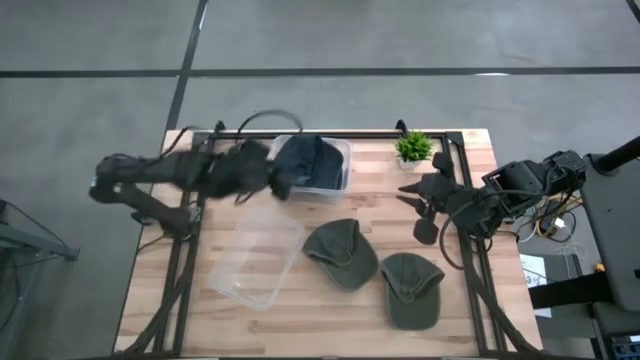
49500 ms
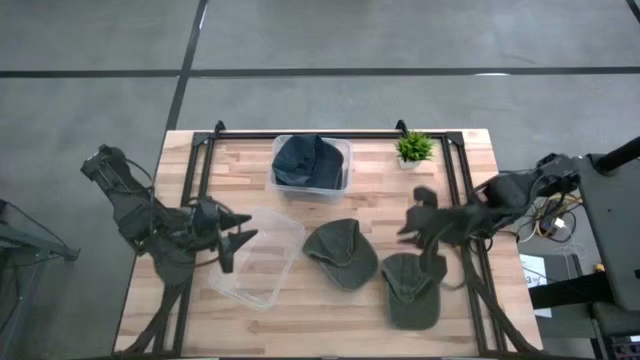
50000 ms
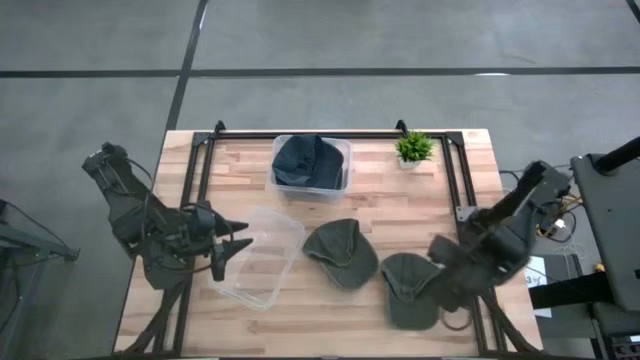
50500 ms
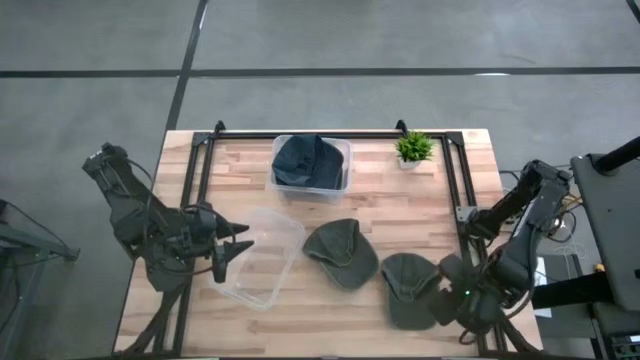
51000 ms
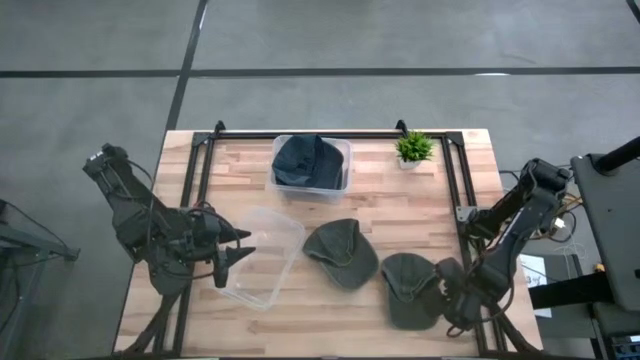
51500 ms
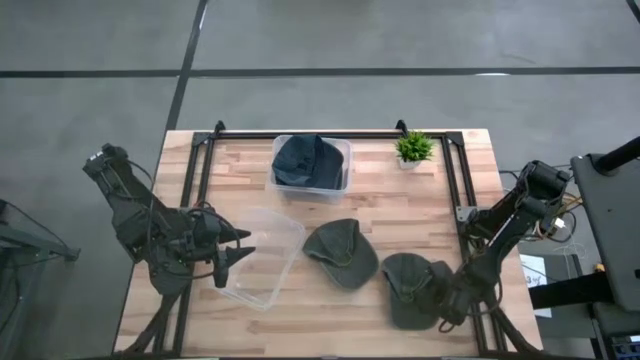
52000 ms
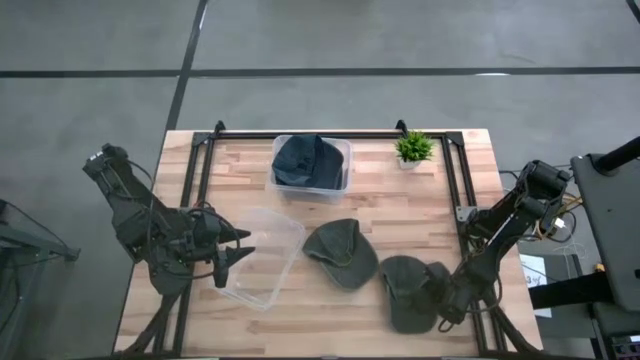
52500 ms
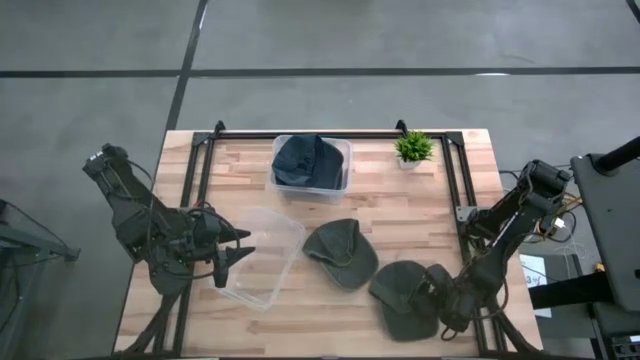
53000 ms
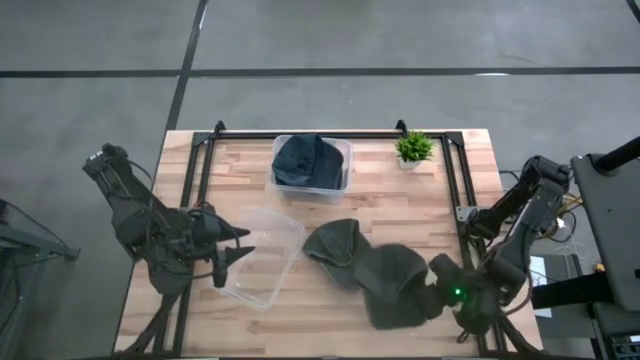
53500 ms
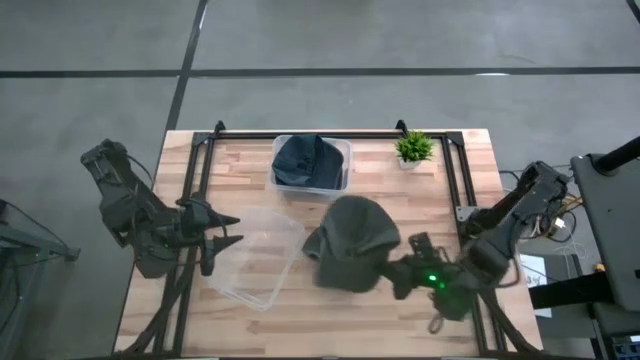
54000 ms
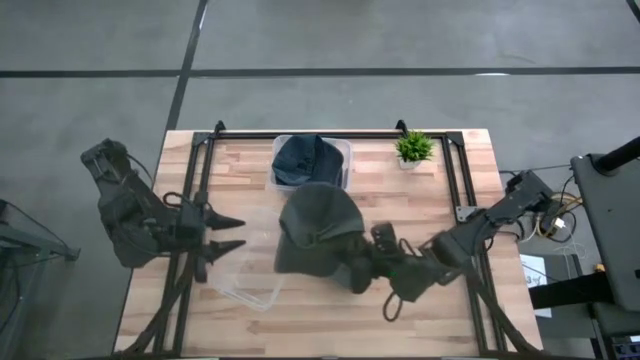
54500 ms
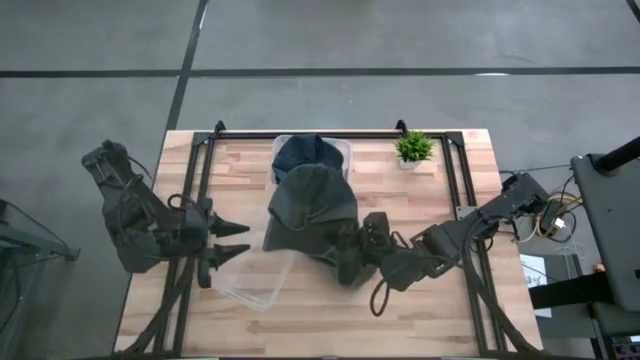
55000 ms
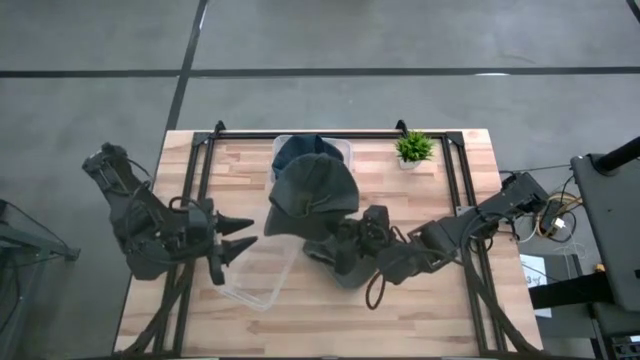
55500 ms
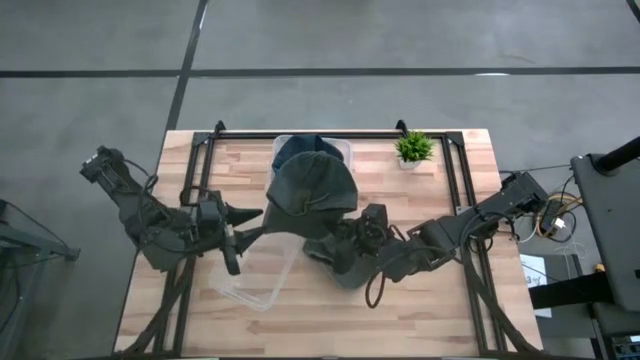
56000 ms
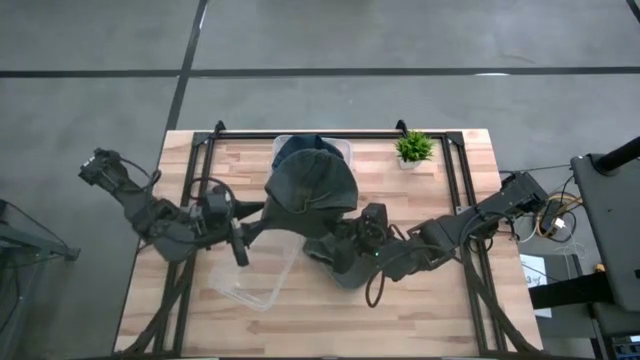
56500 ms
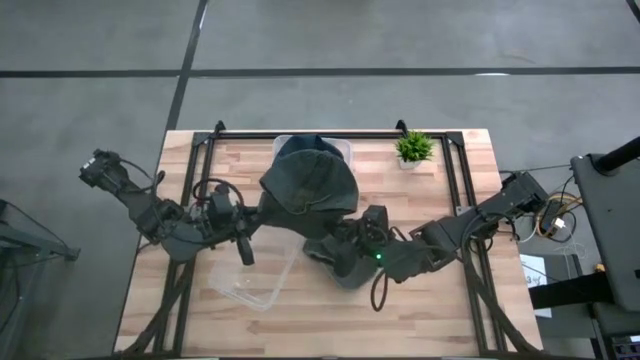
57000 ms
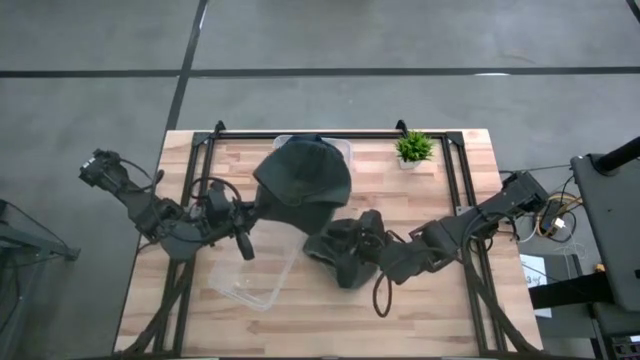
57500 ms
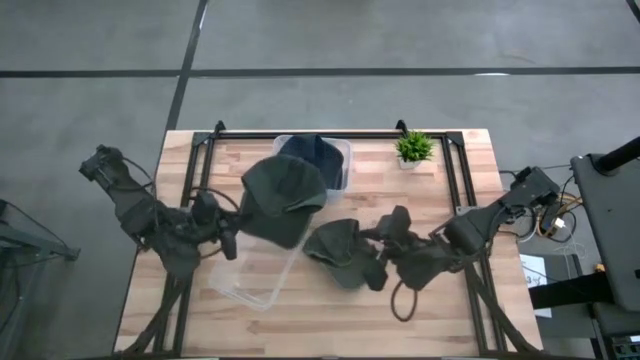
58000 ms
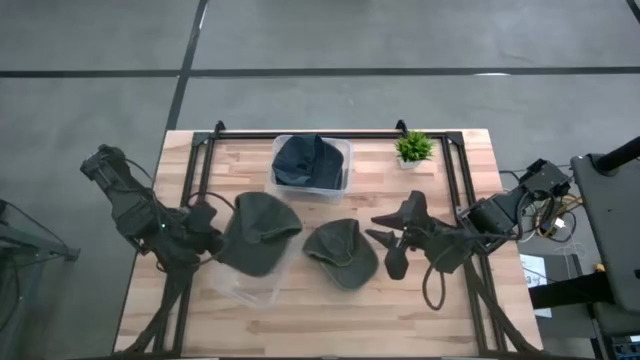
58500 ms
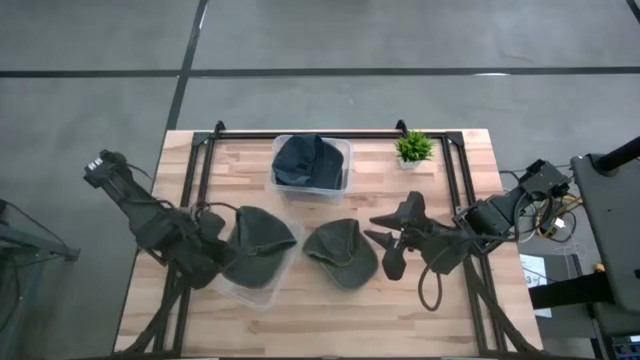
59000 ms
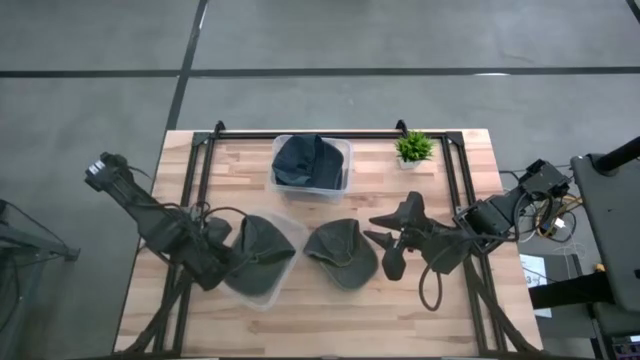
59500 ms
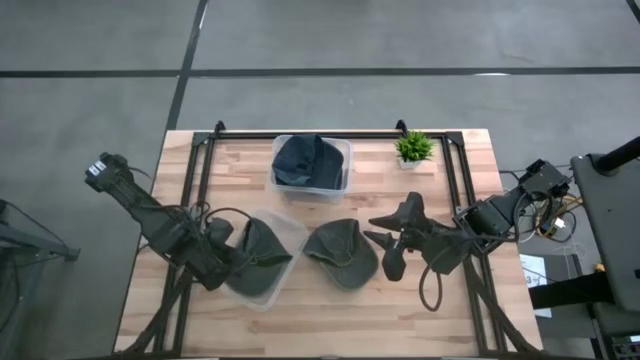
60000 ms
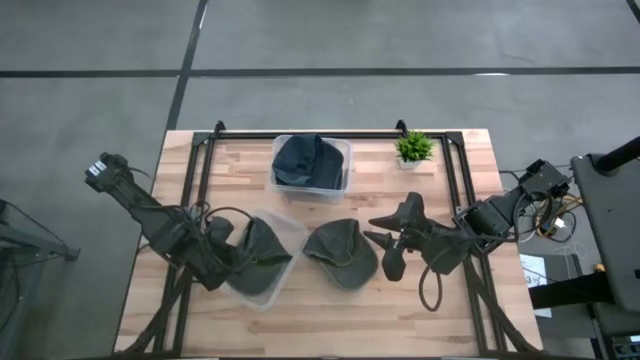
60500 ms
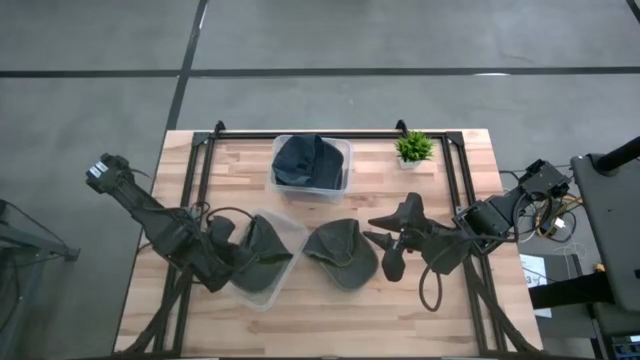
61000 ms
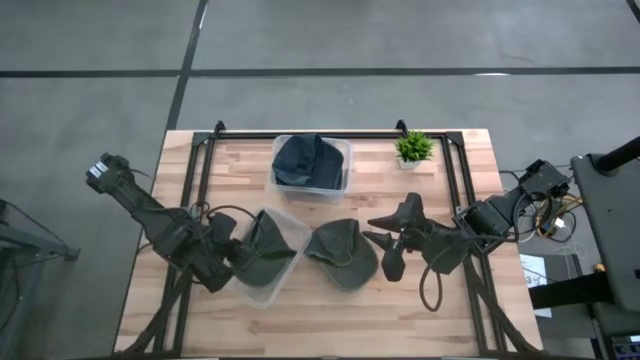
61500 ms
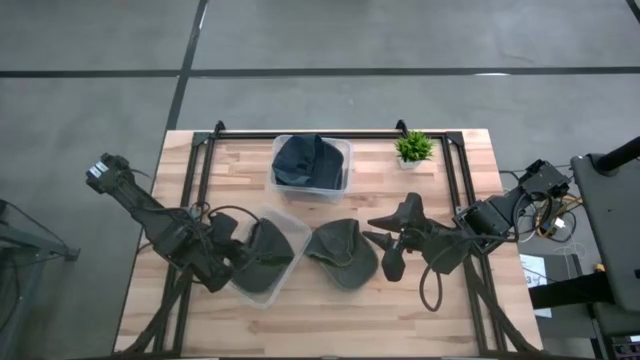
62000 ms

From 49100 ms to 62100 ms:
Task: Pick & Place hat
Put the right black cap into the bottom transparent bin

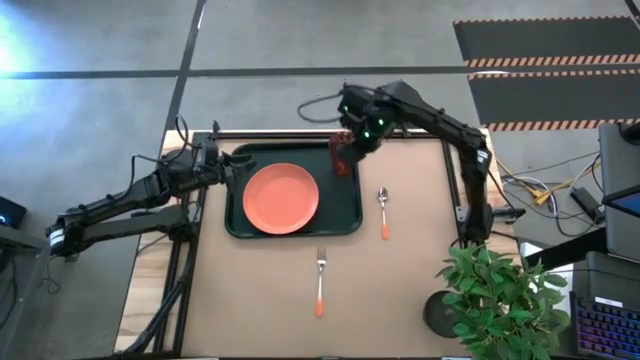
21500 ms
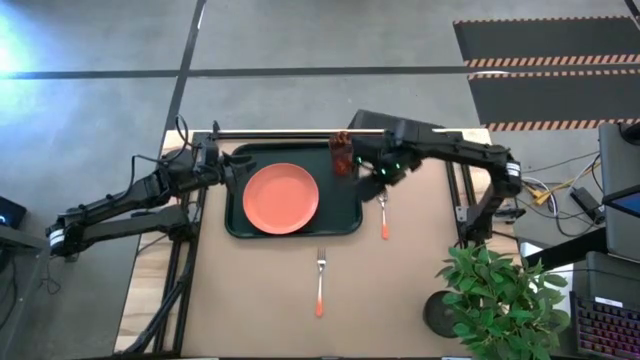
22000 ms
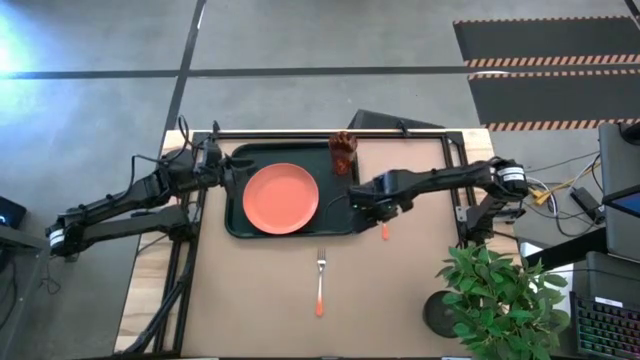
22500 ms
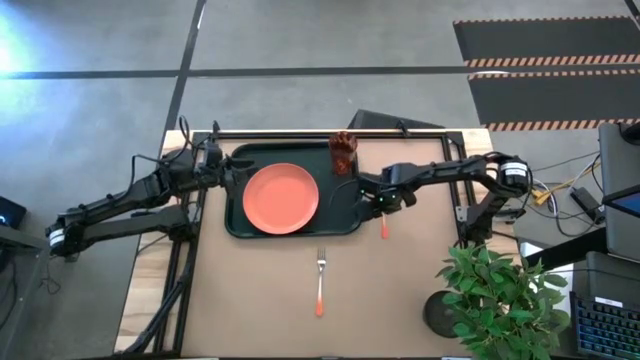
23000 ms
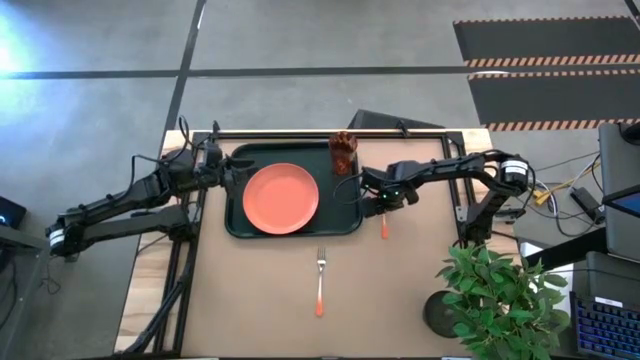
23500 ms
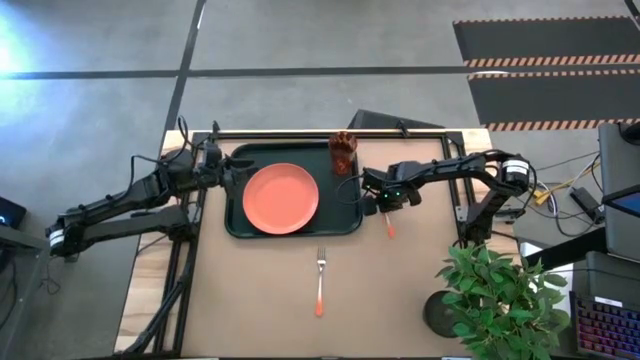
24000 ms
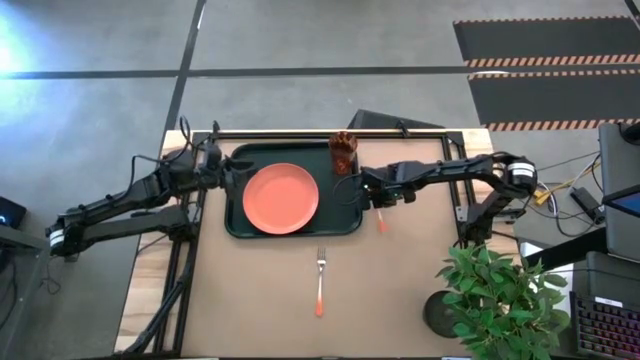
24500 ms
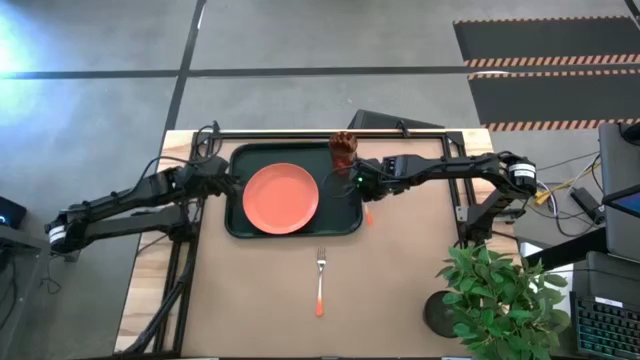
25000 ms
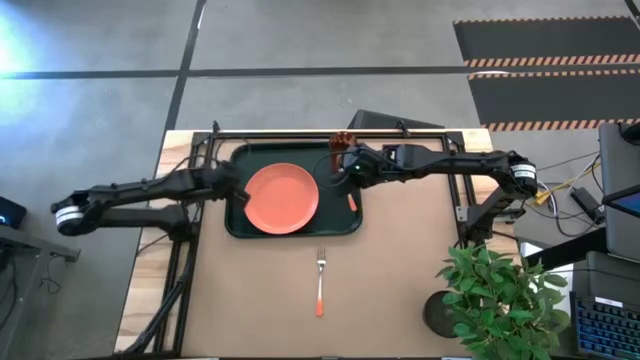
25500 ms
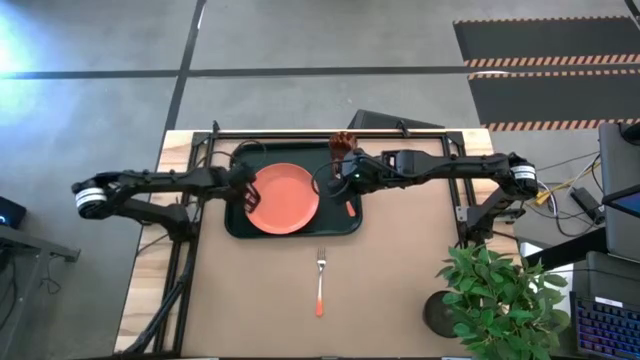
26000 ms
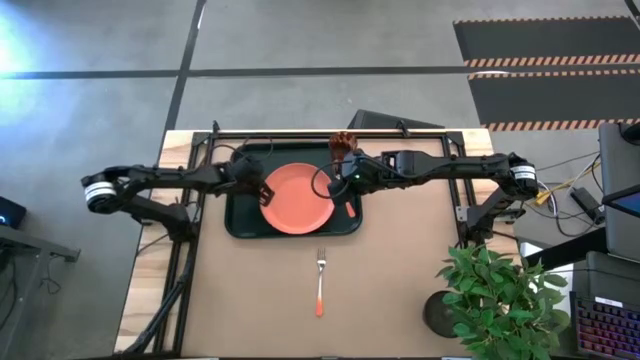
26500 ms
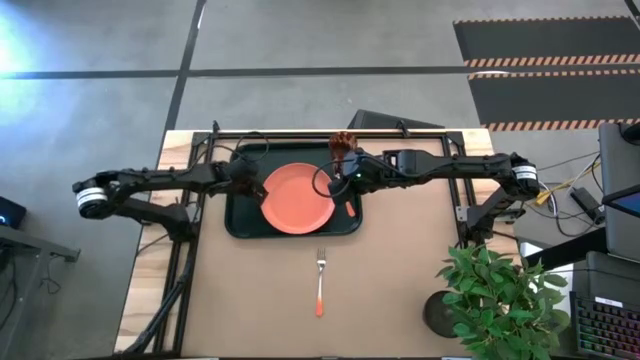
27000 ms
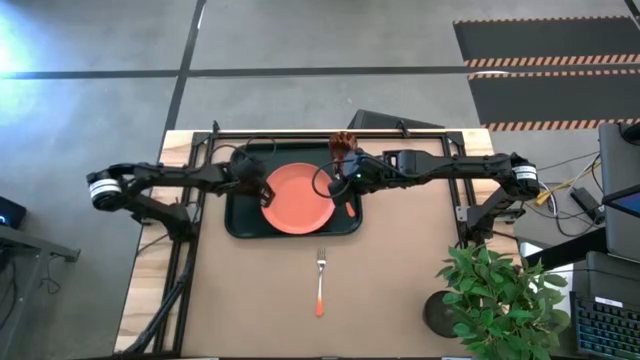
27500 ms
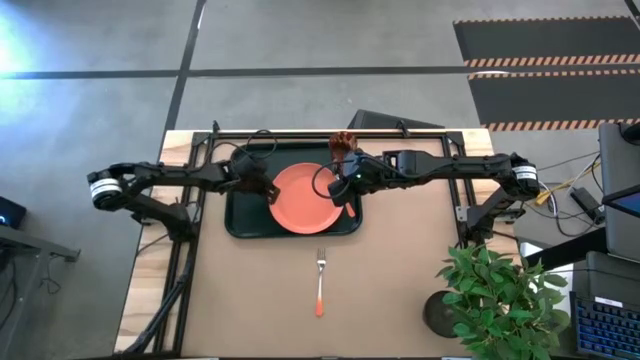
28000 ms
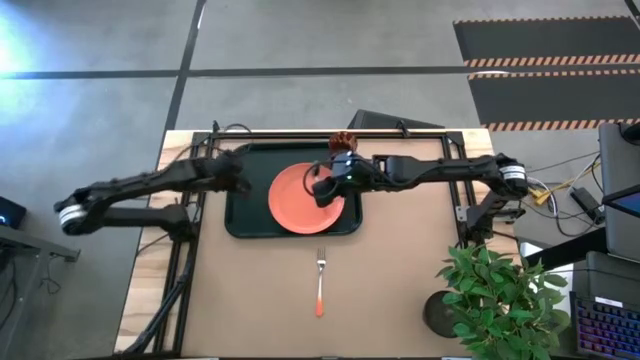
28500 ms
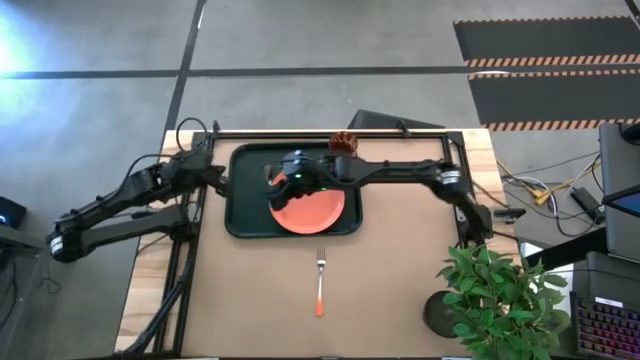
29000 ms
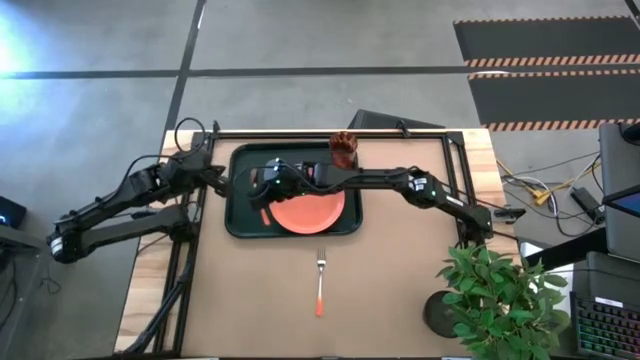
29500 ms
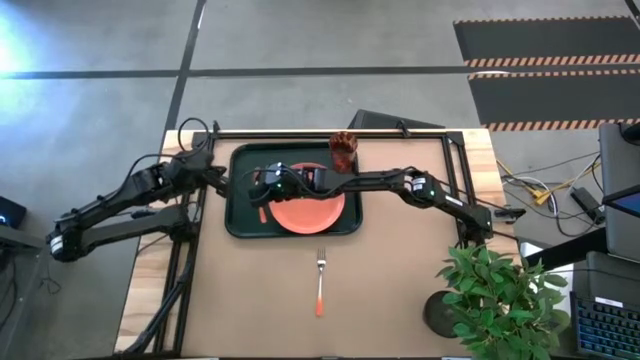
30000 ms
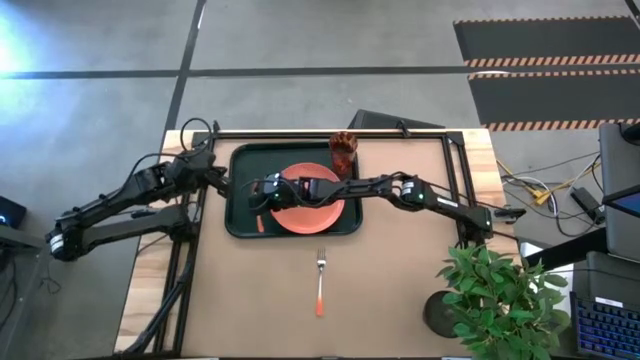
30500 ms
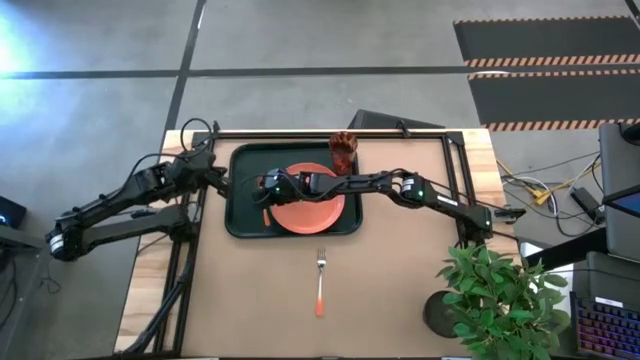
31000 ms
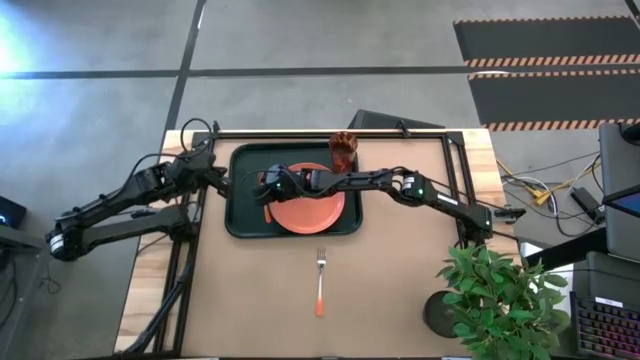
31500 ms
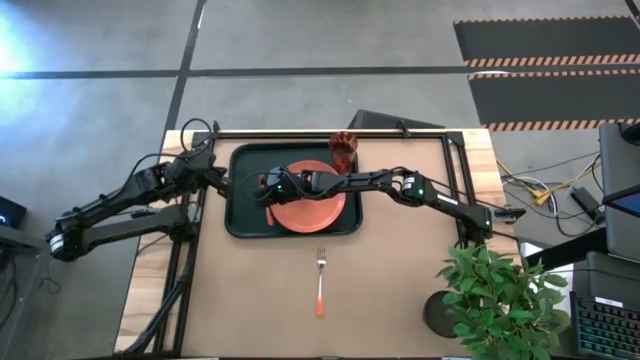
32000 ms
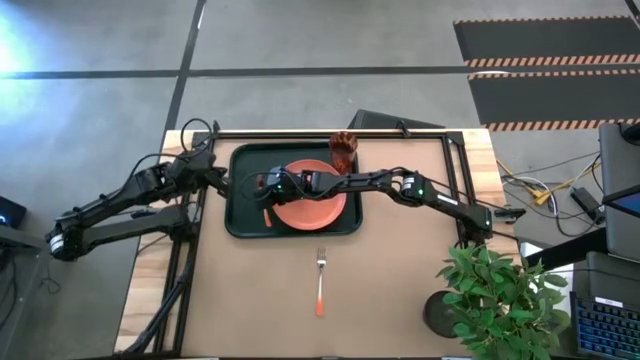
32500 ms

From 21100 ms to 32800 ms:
Task: Pick and place plate/cup/fork/spoon on tray
Put the orange spoon beside the orange plate on the black tray
